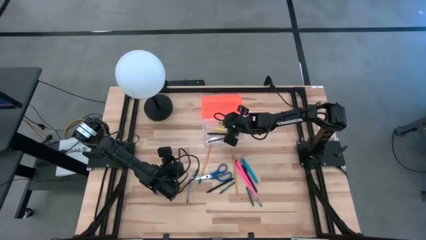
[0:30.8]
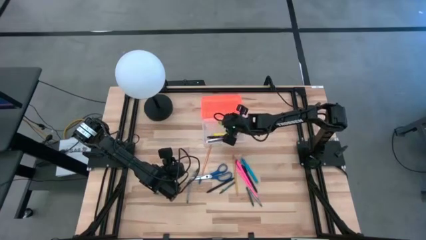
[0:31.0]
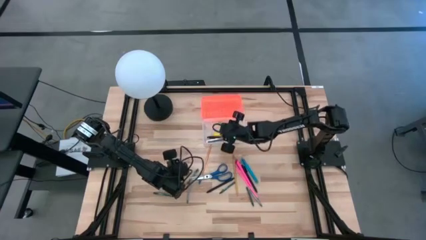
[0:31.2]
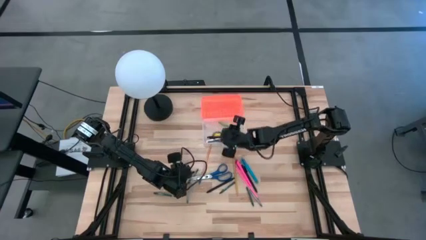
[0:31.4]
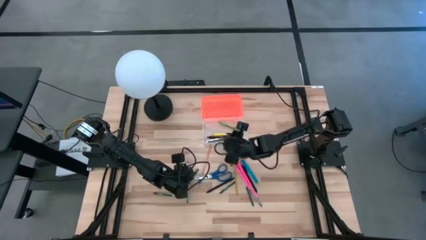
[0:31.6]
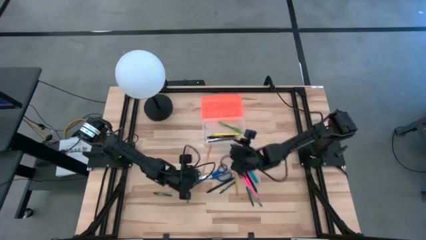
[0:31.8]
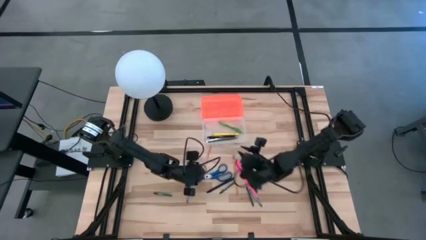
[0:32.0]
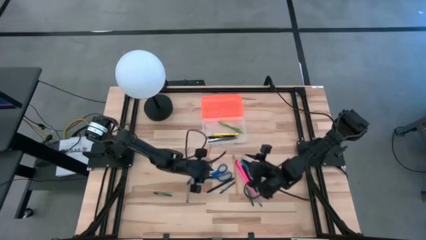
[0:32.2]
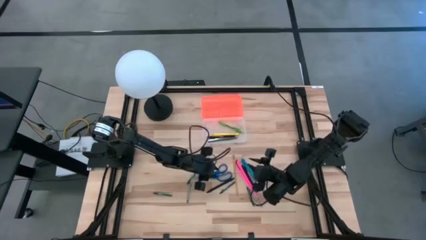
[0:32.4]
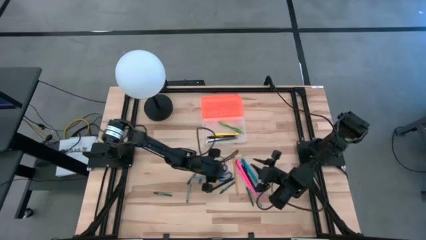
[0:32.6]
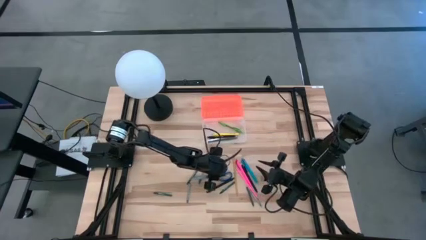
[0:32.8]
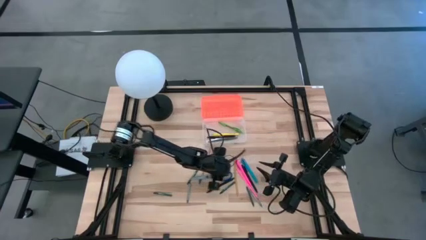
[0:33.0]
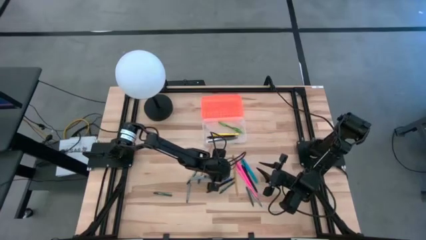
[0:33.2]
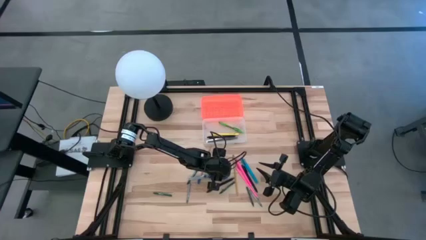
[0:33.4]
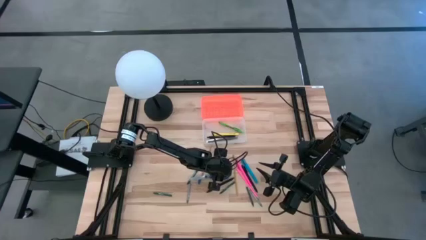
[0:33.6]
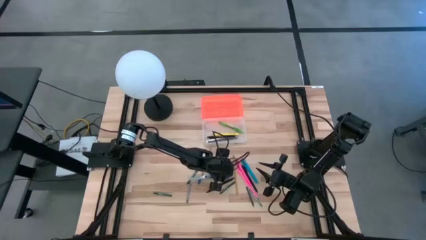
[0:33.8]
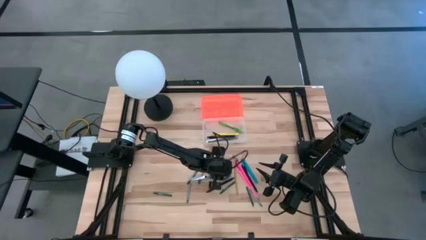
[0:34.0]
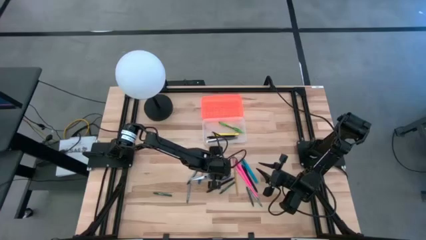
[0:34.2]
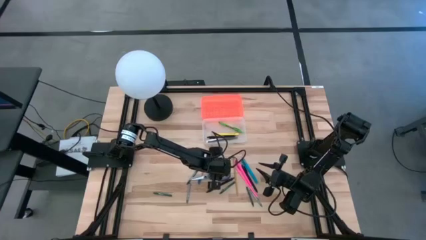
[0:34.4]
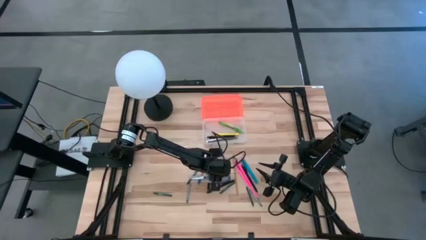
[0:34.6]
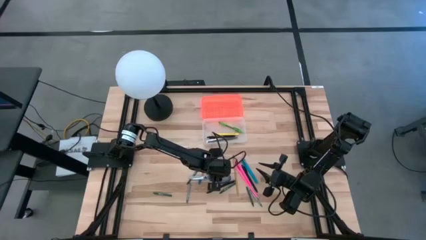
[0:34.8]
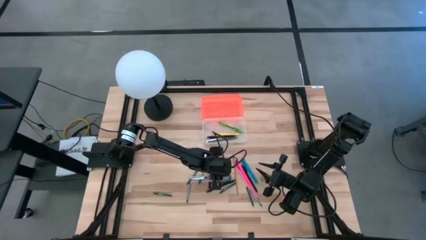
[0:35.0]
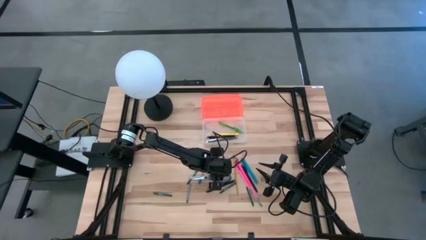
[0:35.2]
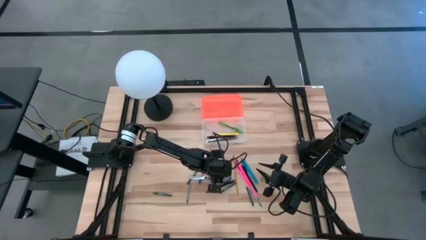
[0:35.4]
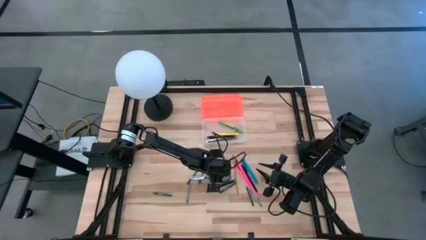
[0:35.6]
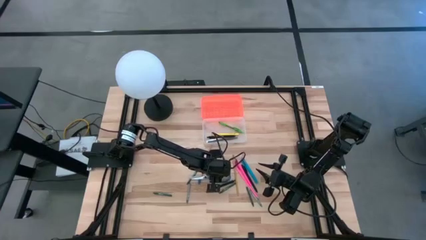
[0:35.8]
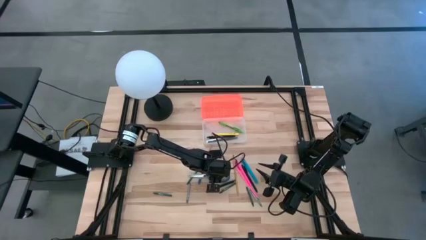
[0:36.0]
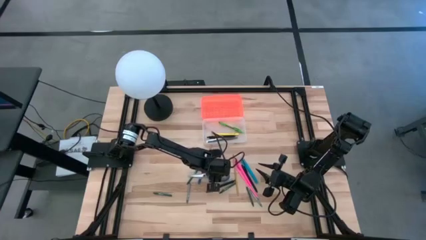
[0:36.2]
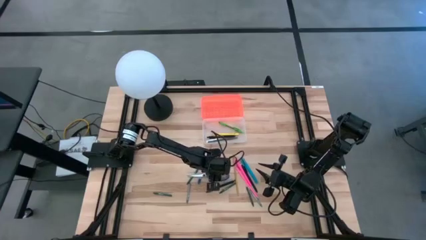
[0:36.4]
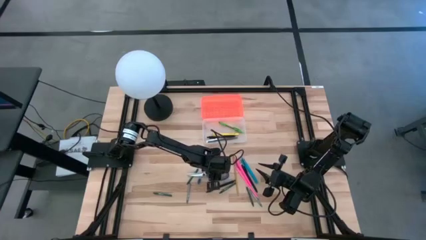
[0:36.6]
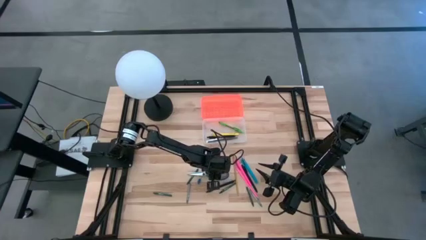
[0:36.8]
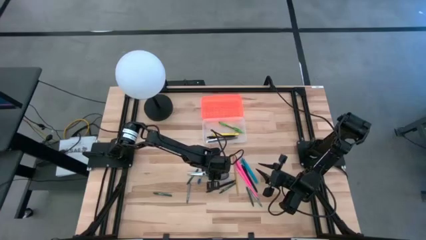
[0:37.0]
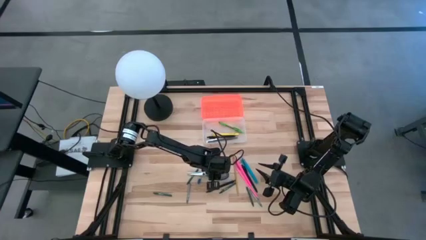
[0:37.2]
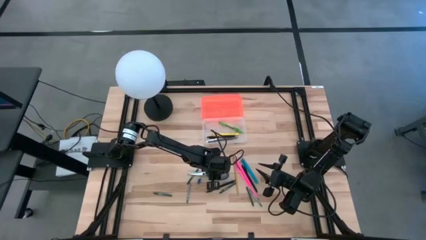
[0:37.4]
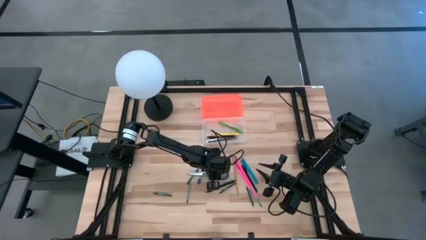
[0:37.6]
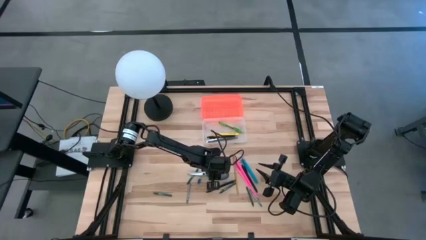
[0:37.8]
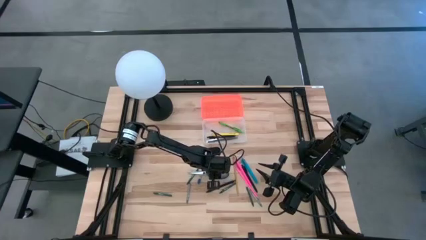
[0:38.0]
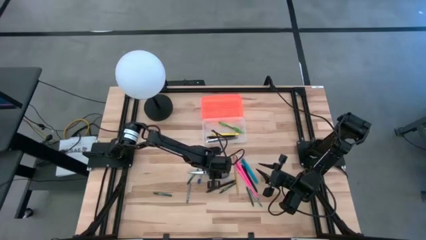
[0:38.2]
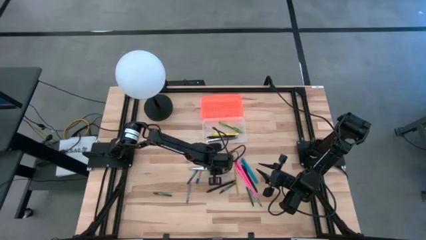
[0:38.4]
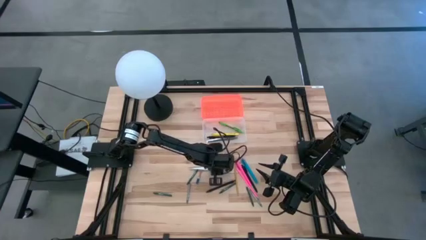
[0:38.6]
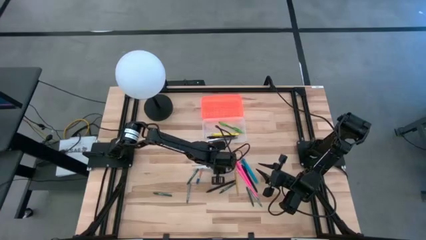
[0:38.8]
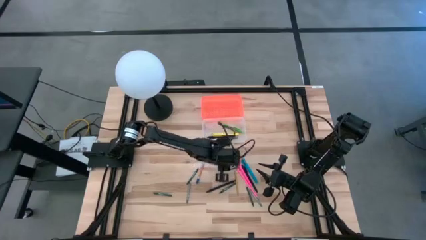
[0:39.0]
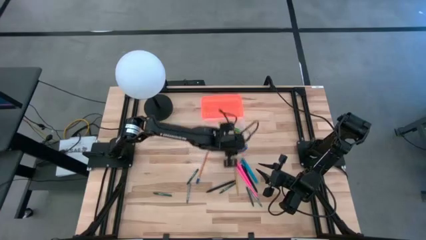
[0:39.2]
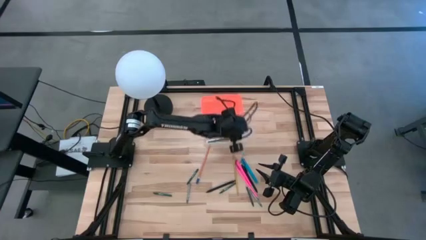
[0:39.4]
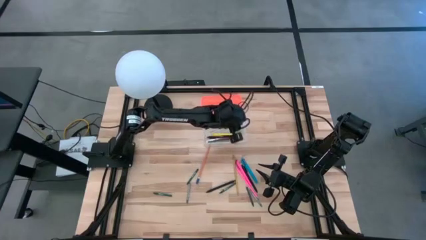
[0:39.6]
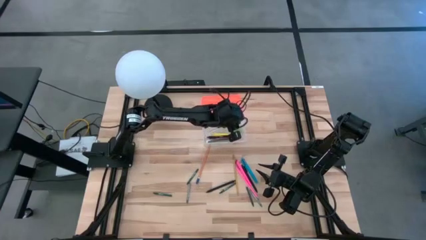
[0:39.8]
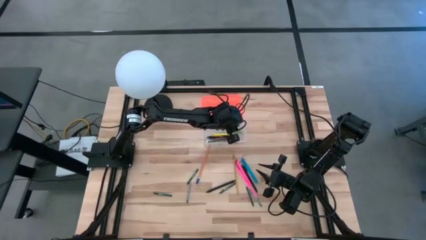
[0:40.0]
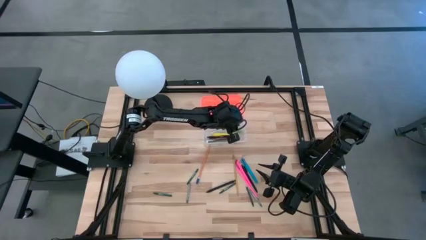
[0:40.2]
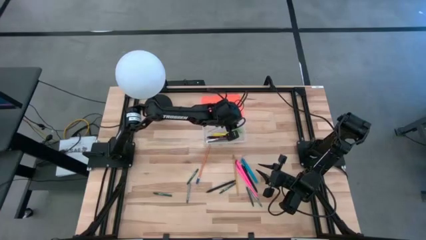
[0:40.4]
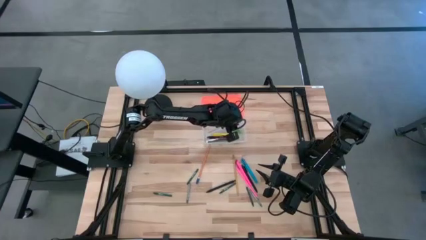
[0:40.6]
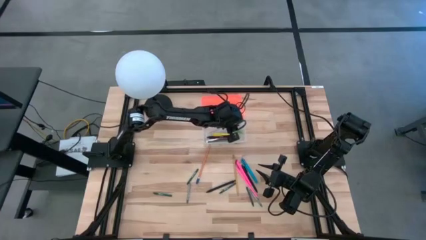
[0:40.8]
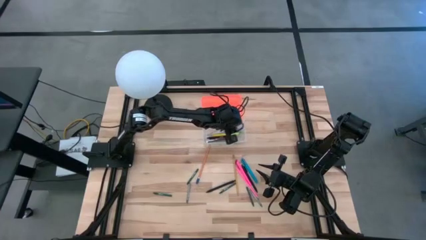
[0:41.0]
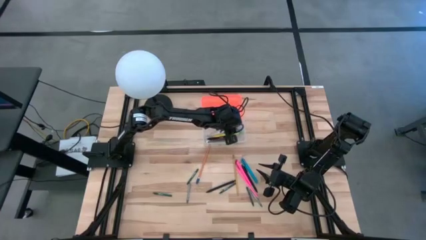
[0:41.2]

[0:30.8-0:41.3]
Task: Pick & place school supplies into a supply box
Put the blue scissors into the orange supply box

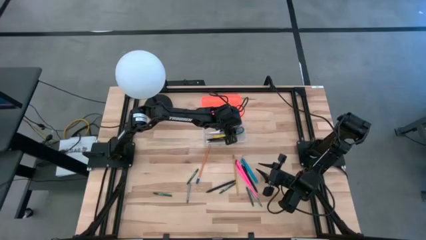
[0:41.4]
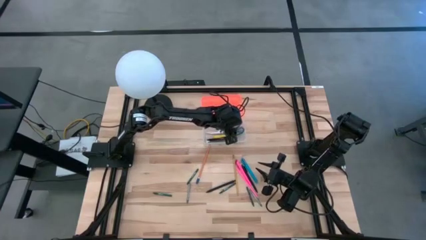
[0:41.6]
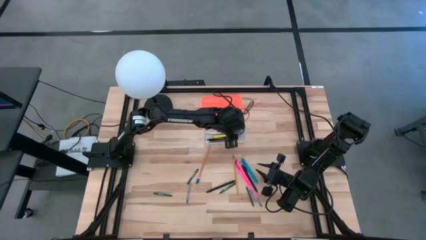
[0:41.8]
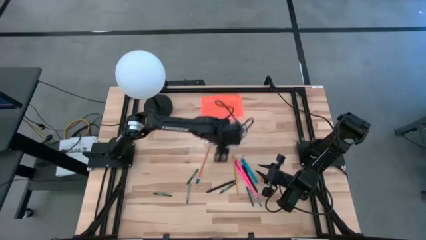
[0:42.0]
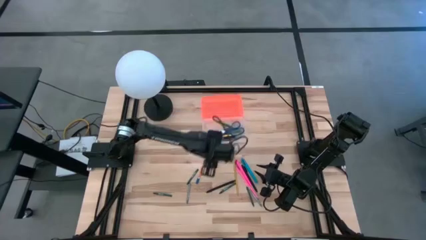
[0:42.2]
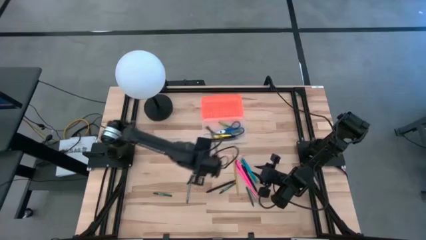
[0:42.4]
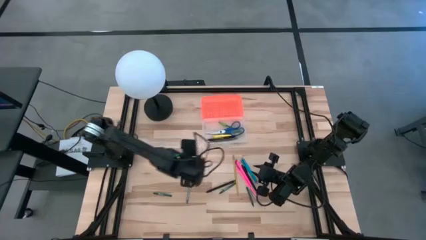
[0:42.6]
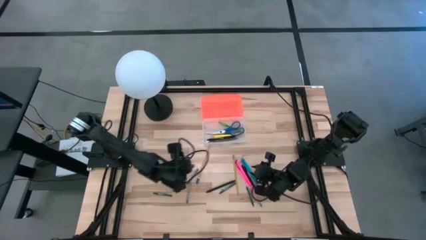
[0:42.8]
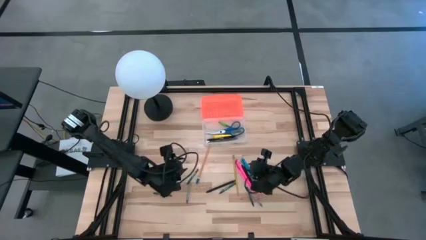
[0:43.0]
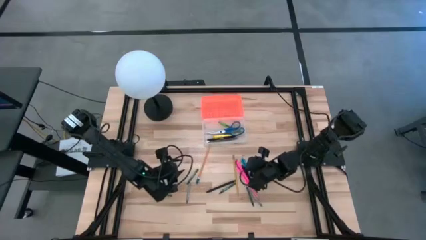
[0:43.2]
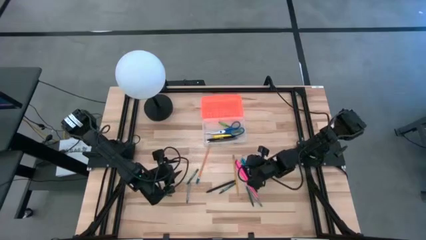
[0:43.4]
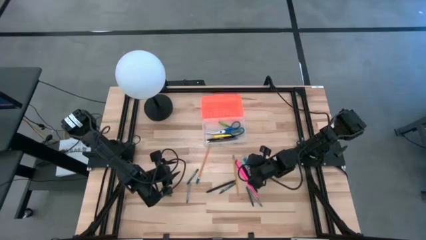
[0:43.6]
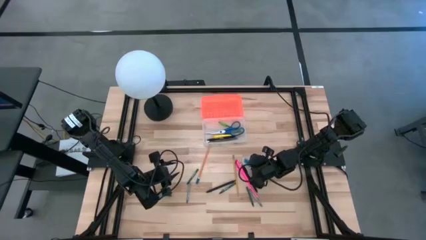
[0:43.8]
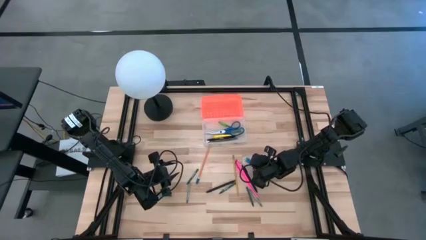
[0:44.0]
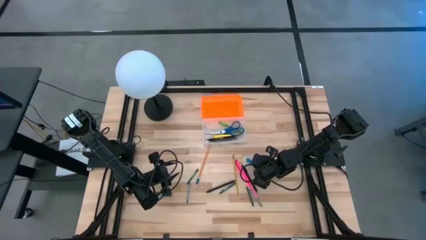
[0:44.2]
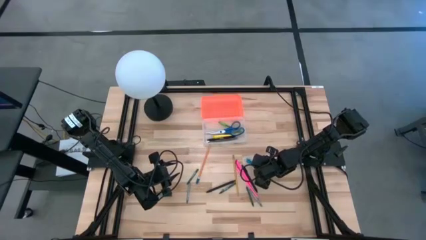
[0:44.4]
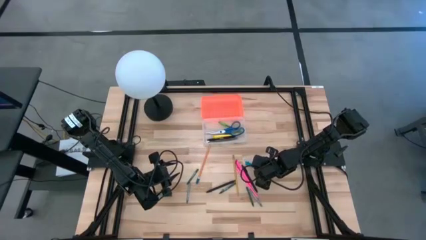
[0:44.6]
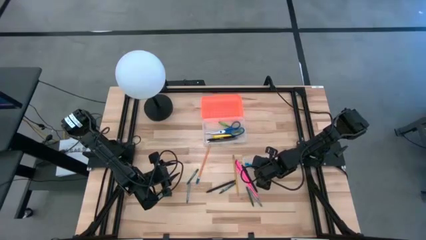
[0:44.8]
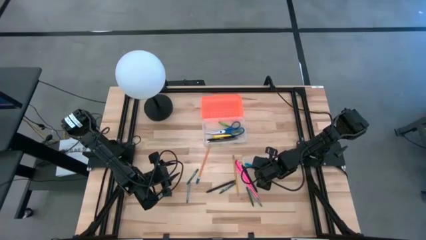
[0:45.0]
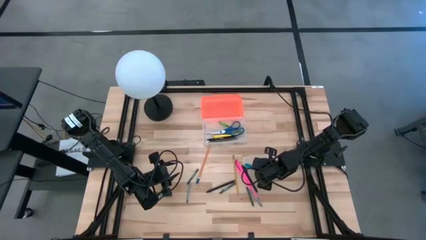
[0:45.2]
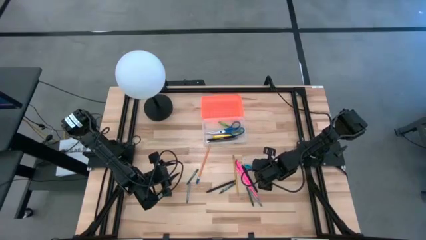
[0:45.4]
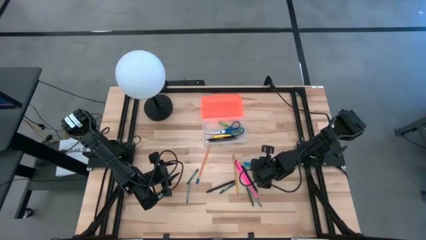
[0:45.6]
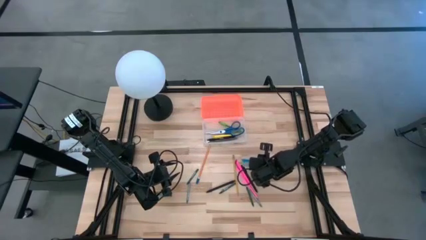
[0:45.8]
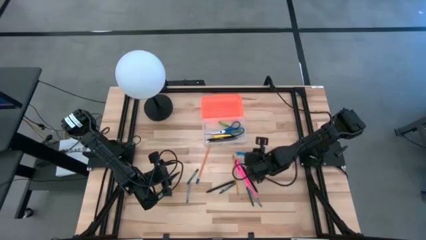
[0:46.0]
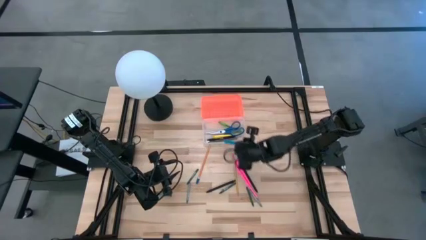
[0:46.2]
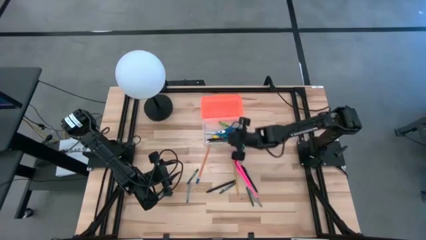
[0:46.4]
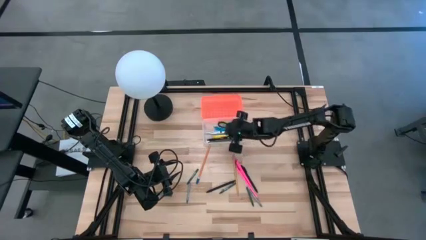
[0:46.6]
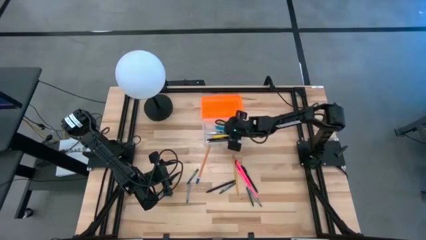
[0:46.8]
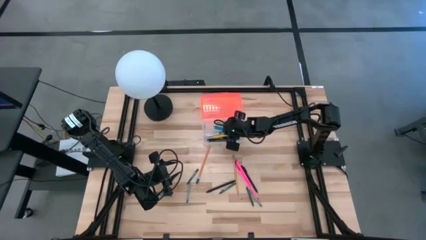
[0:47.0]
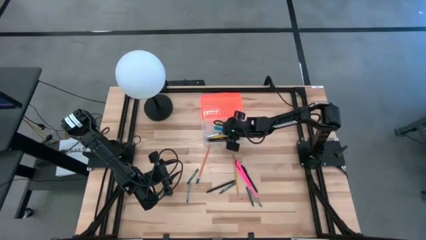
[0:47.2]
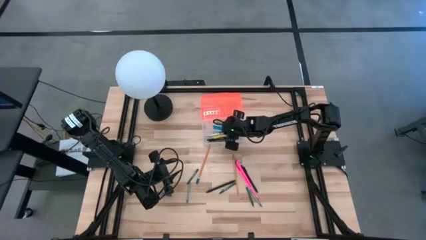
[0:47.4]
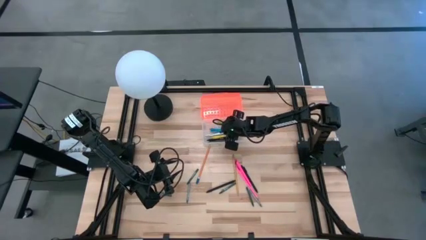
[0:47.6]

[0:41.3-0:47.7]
Put the blue pen into the orange supply box

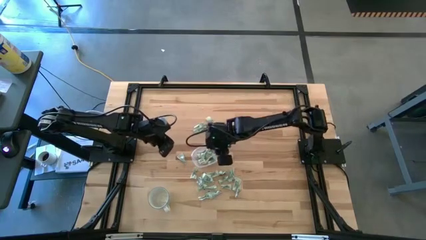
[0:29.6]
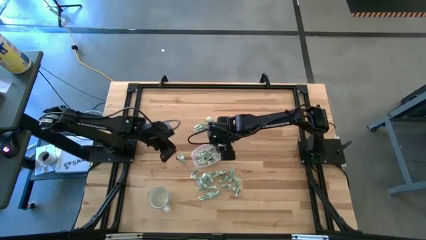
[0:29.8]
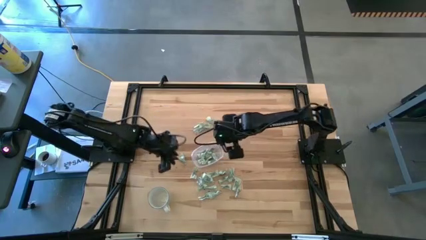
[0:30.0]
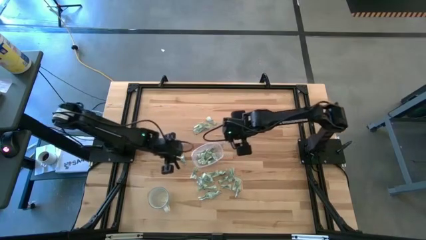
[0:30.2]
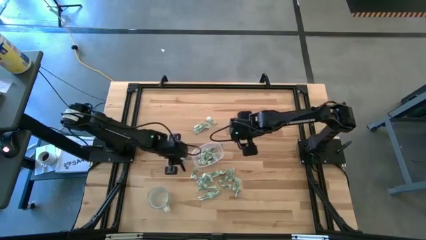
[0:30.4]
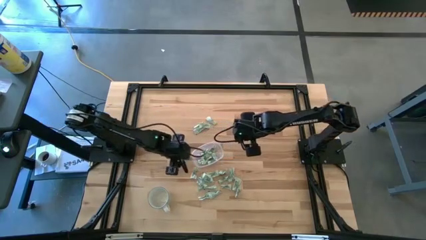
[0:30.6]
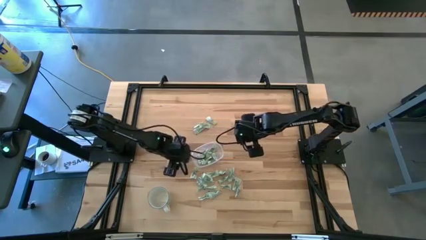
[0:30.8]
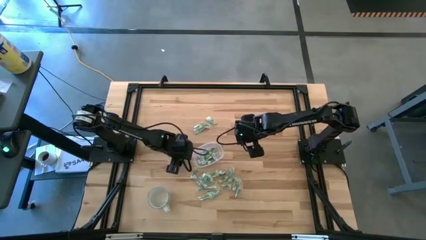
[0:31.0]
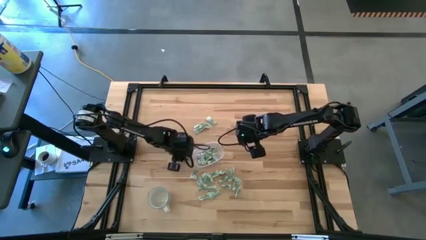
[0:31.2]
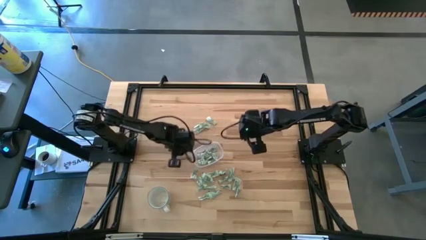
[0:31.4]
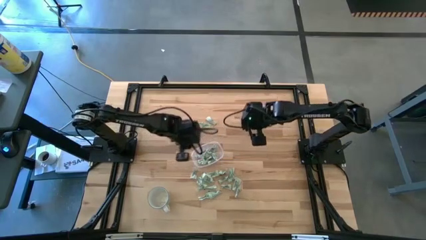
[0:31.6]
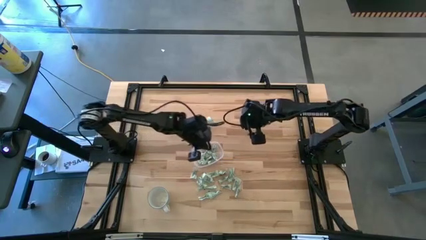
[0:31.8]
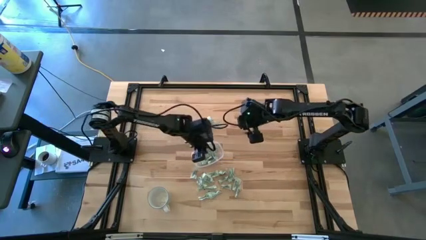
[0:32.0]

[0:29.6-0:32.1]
Task: Pick and place Stevia / Truvia into bins
Put the stevia packet into the transparent container
